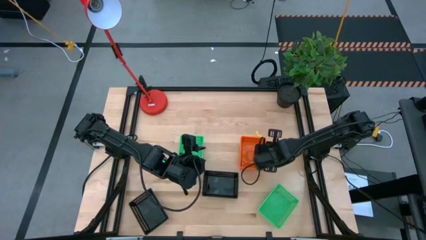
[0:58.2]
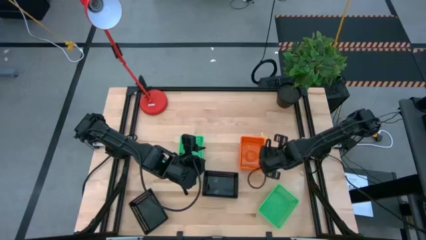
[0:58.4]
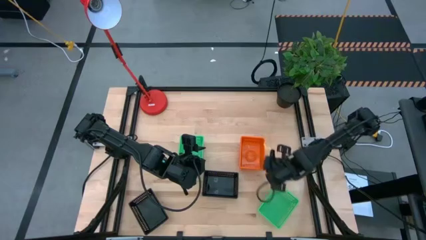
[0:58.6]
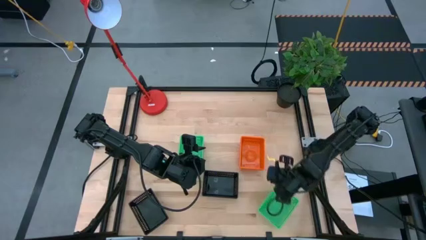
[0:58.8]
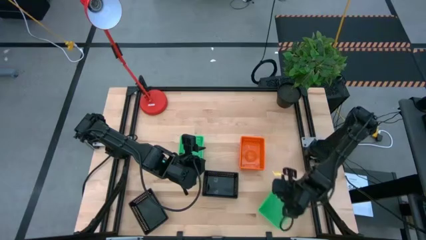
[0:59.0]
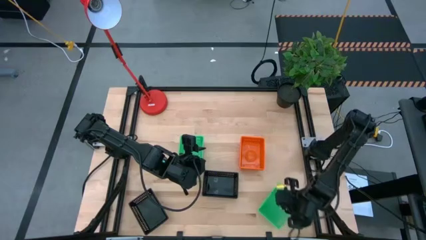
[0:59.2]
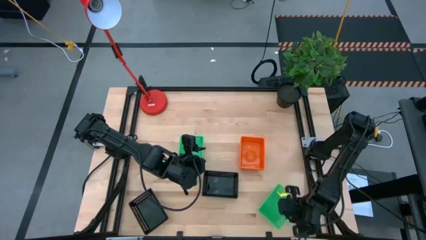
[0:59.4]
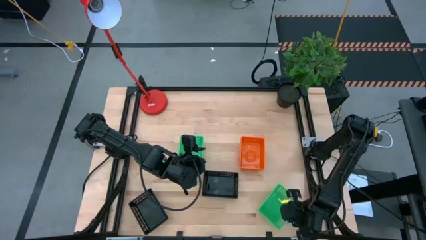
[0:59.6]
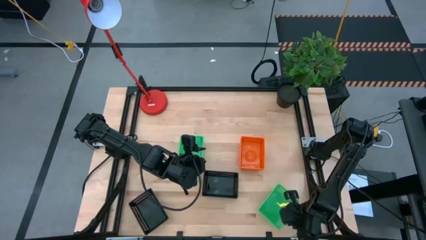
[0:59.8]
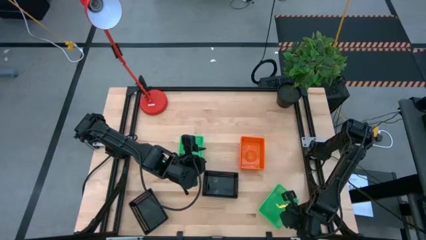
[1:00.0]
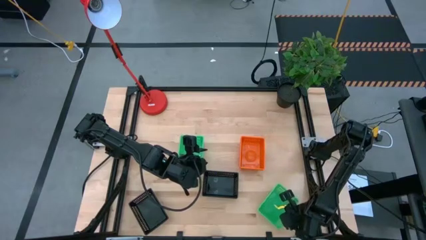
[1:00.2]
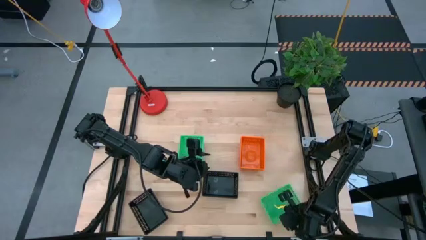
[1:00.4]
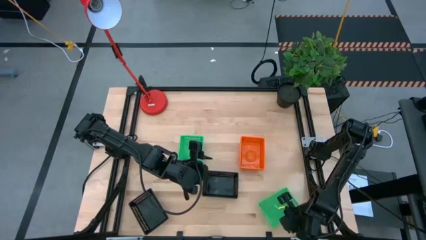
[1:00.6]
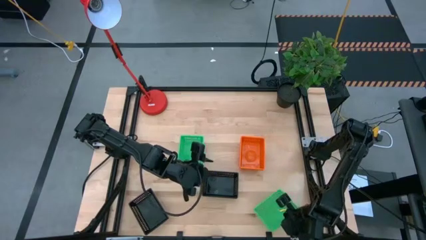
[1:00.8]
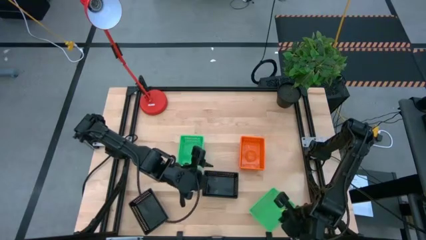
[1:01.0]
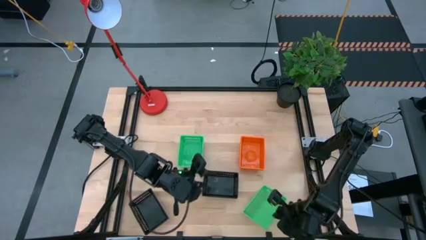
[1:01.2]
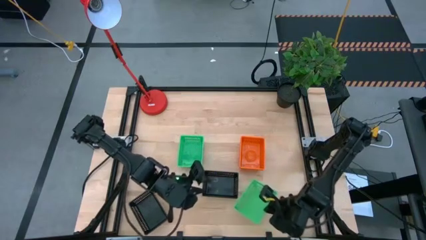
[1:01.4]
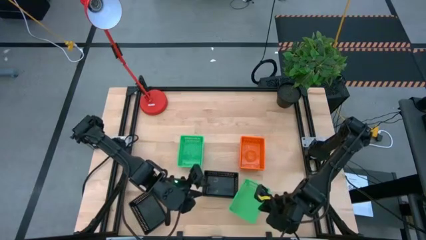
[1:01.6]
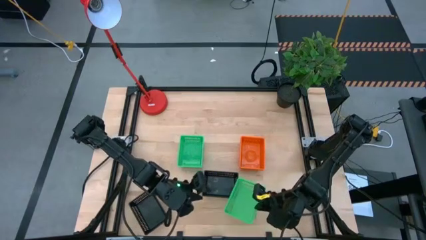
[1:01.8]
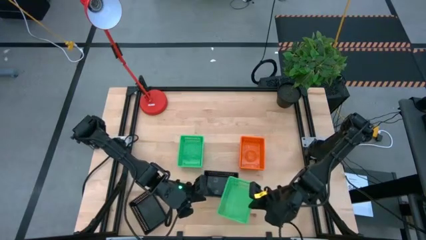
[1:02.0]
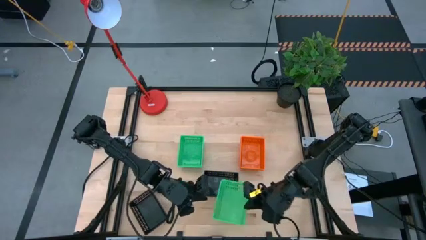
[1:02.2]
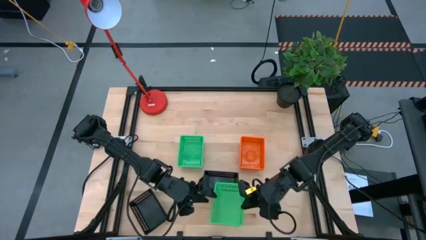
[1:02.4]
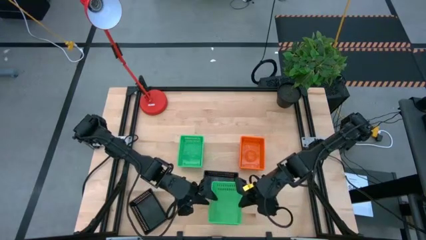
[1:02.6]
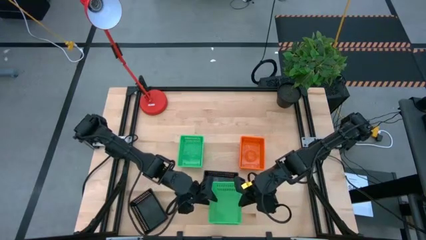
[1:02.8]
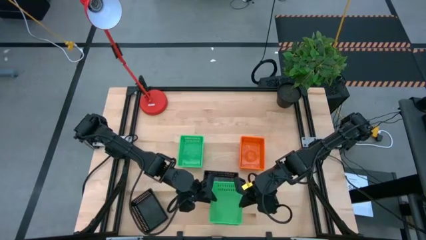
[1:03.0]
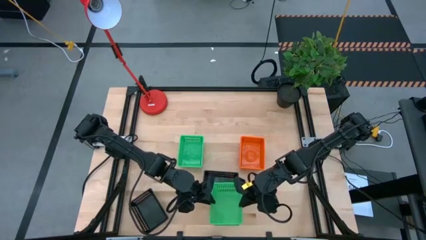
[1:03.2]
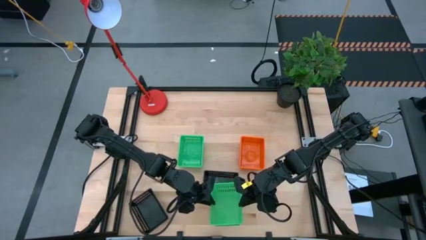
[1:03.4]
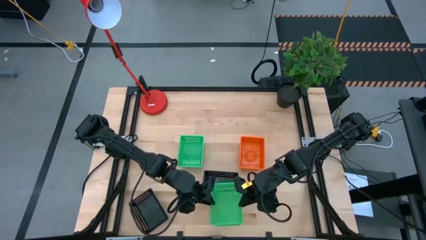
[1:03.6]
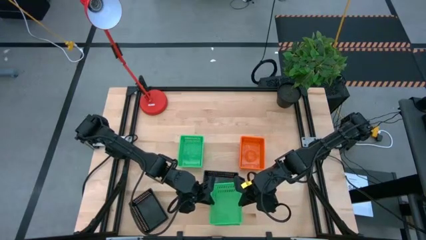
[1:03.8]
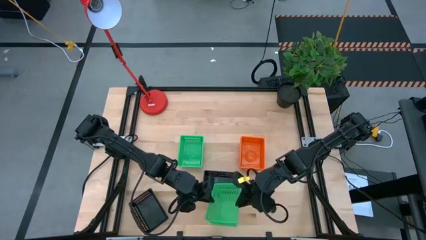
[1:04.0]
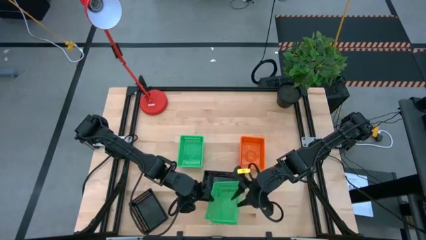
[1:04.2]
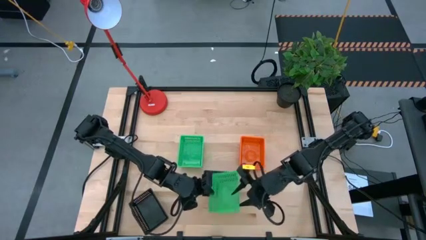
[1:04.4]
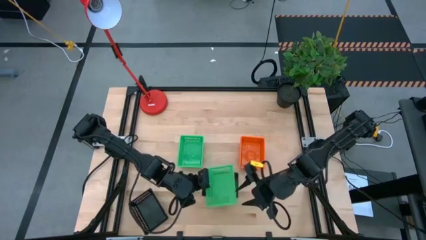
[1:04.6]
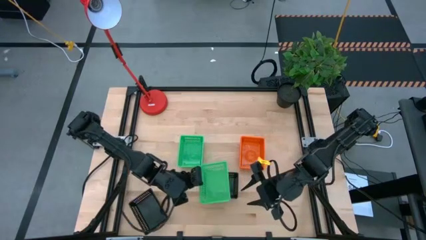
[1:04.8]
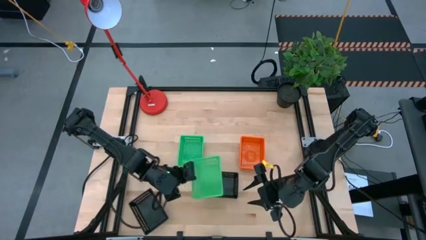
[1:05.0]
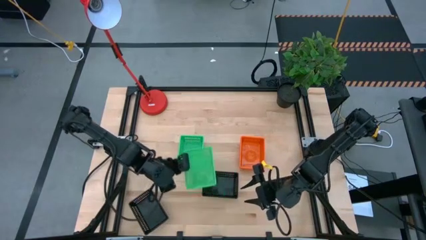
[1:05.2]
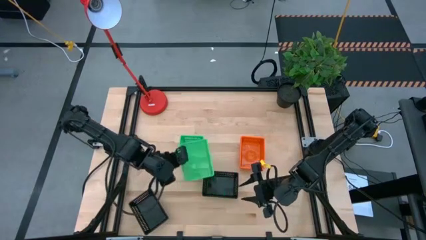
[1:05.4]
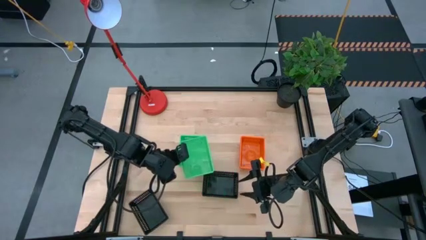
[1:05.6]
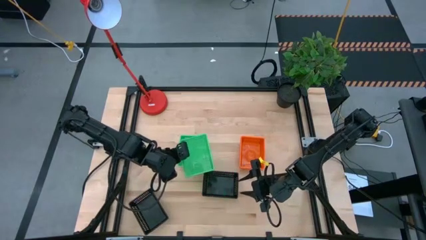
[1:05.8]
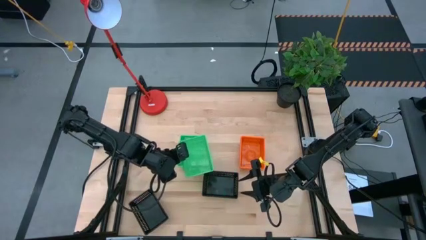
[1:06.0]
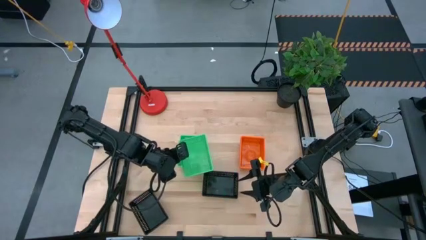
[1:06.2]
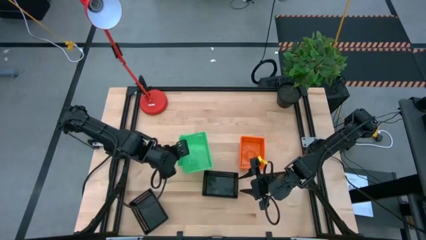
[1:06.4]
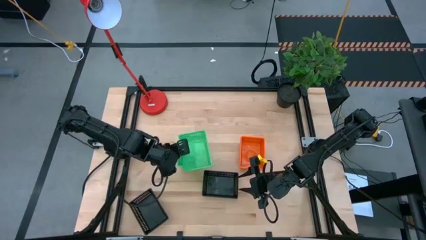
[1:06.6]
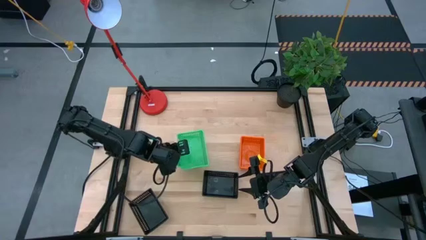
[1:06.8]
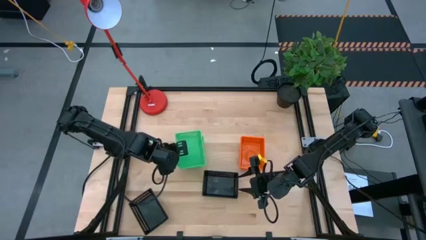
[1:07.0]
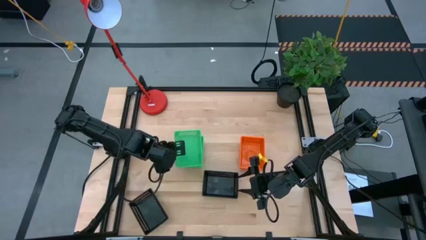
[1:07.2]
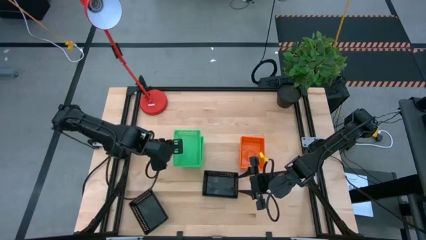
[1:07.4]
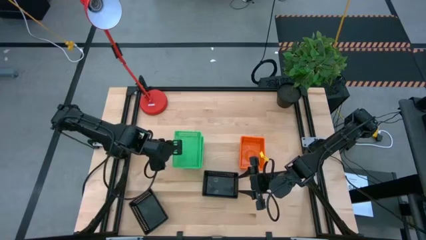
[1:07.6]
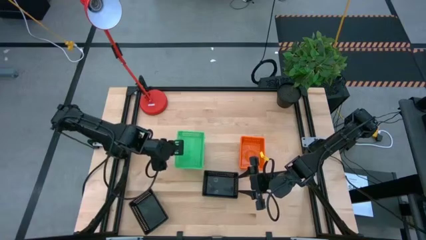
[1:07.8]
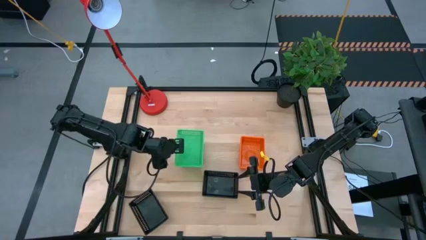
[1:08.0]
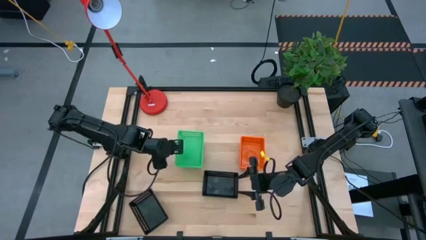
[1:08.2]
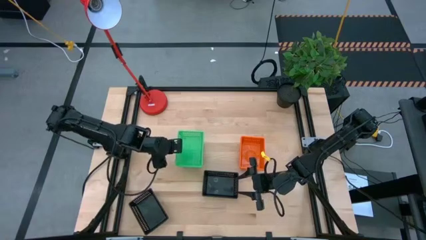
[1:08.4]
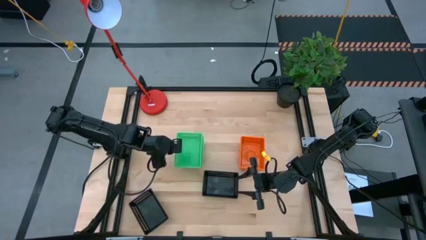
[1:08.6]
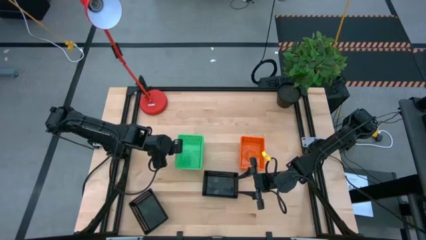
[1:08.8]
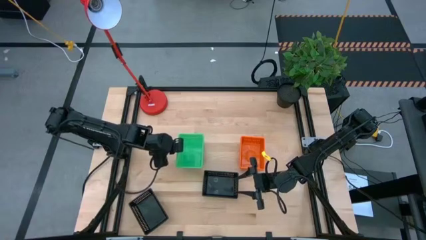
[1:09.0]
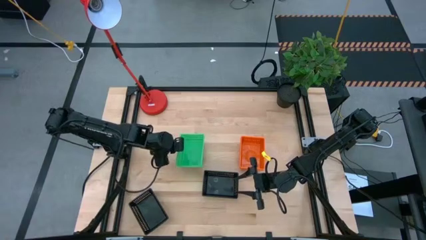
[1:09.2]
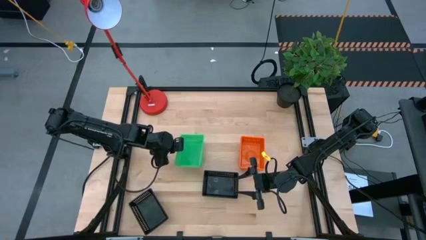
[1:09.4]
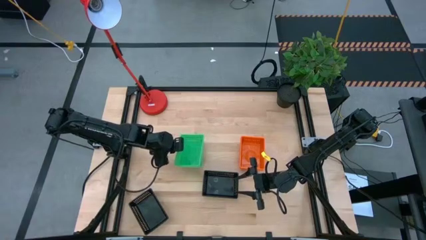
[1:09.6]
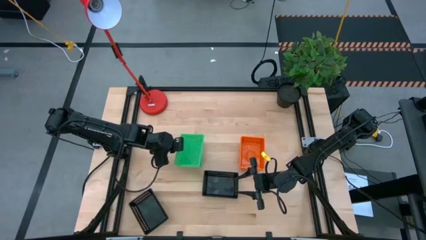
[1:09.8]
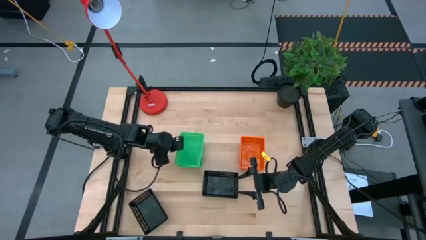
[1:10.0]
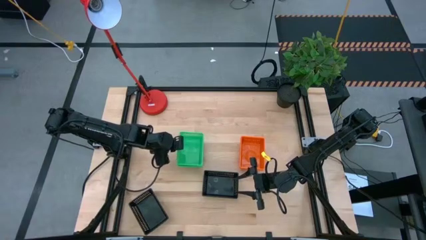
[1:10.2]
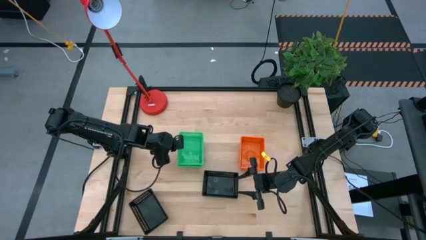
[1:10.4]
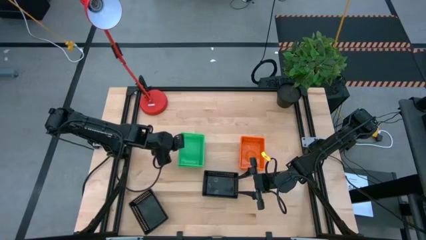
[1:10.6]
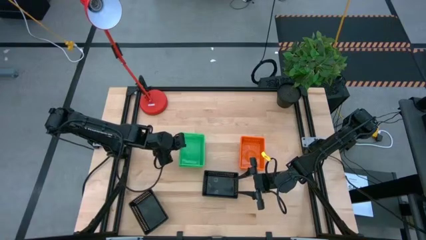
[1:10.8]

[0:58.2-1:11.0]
Stack the bottom green bin on top of the top green bin

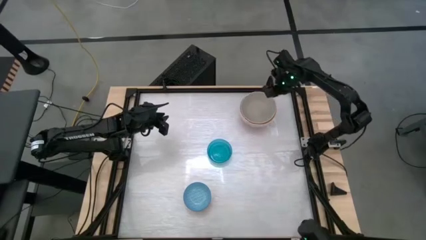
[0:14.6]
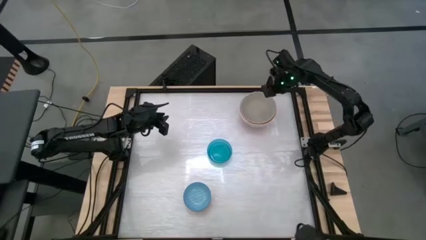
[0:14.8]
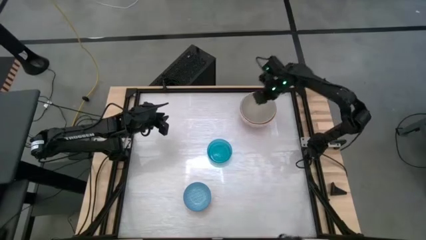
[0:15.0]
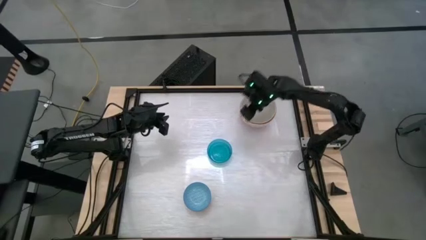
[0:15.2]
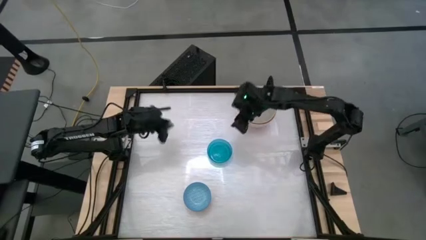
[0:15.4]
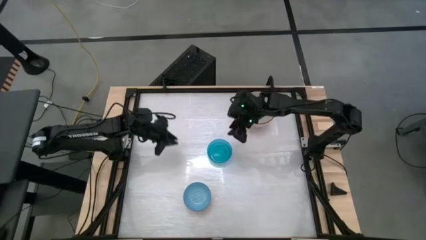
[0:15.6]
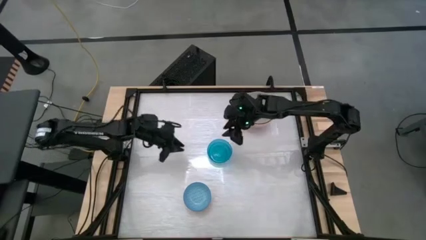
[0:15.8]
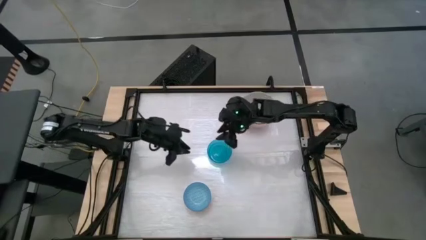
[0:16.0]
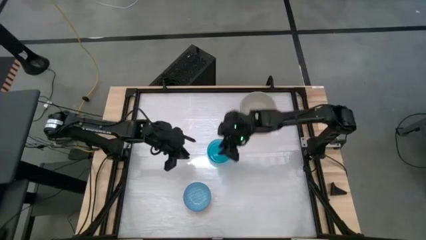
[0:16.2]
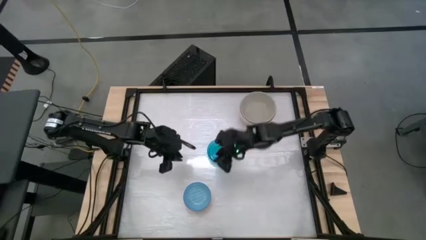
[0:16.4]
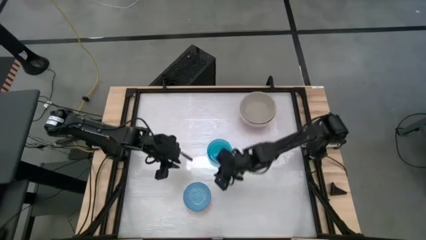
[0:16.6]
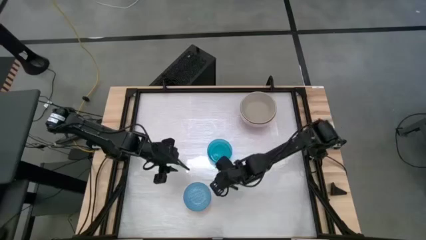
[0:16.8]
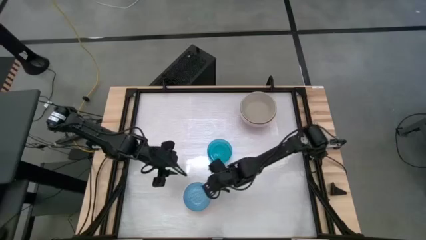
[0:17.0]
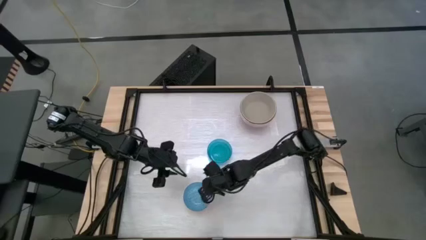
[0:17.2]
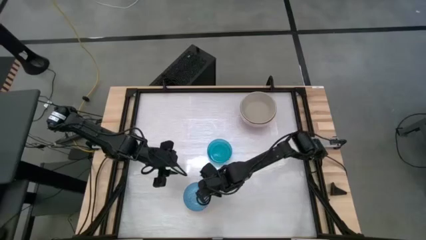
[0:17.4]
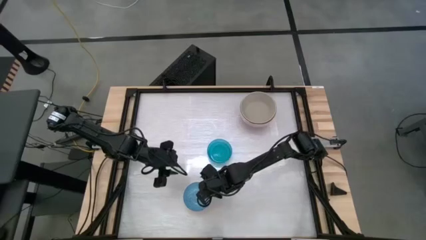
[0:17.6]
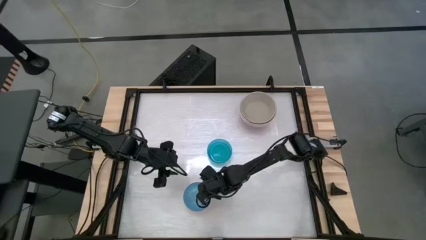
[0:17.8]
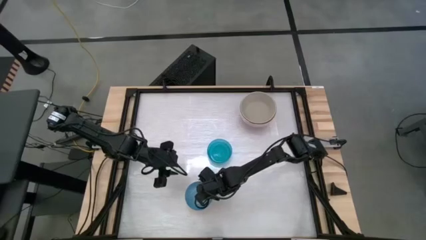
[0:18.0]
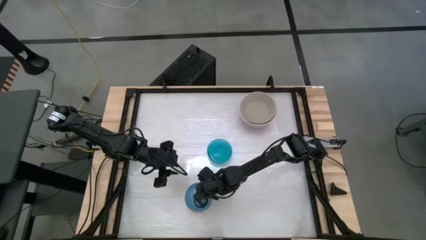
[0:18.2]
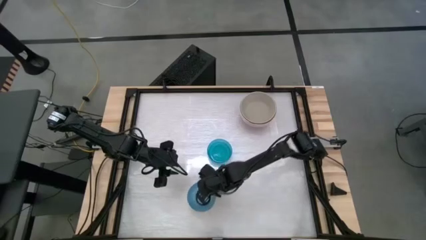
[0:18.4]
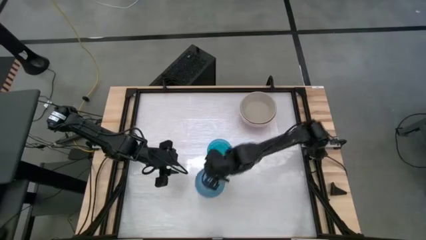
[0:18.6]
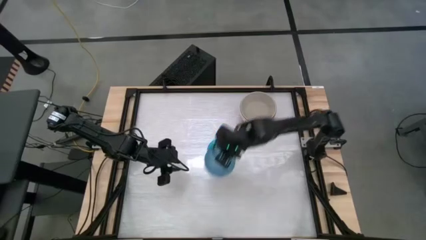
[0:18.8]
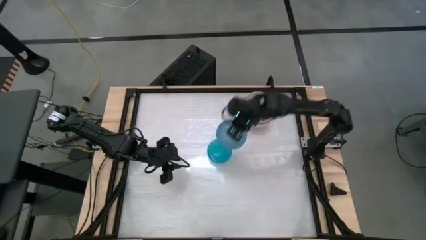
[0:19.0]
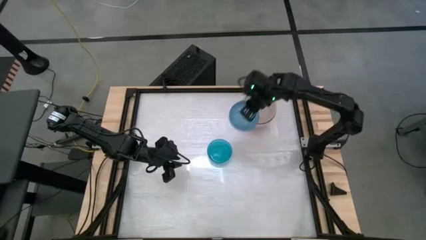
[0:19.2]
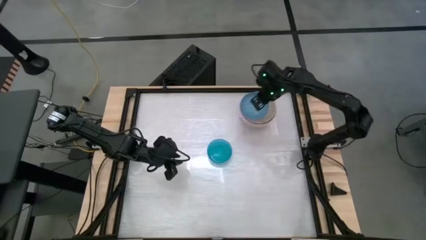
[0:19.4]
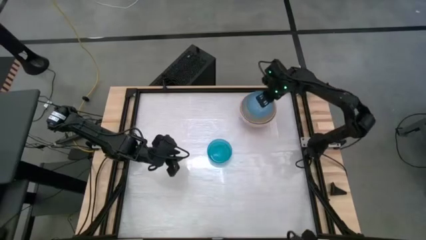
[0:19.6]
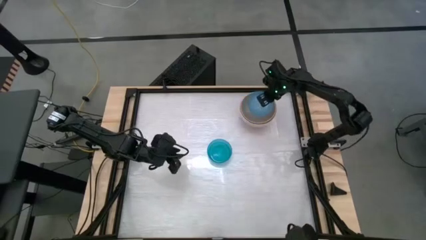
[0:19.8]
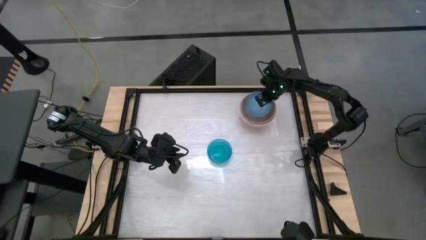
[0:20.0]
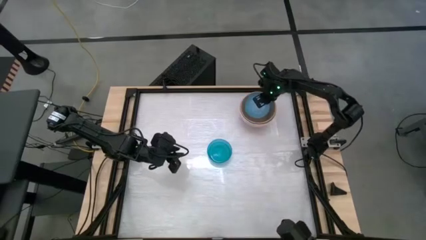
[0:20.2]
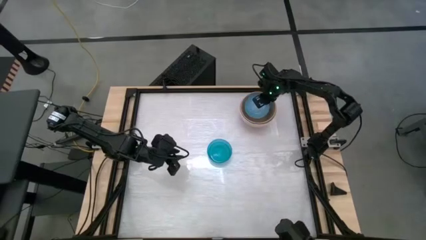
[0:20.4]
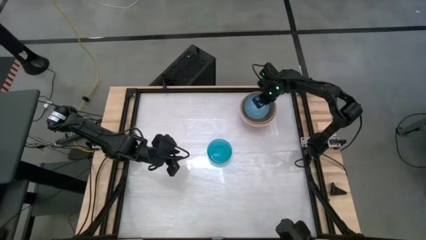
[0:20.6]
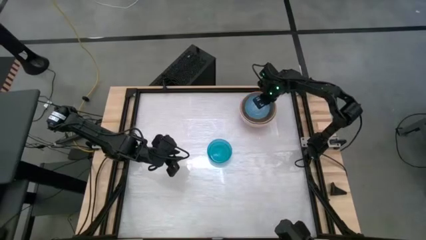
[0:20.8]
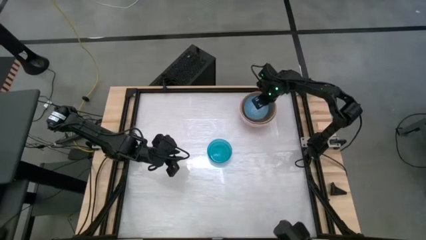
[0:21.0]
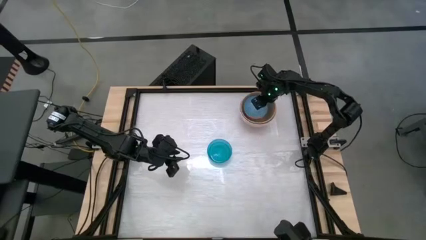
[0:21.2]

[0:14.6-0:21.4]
Stack the blue-patterned bowl on top of the gray bowl
